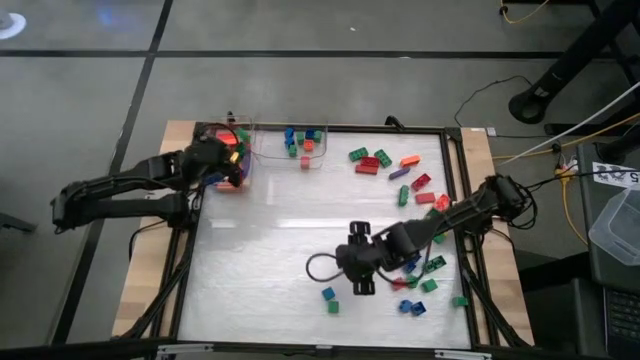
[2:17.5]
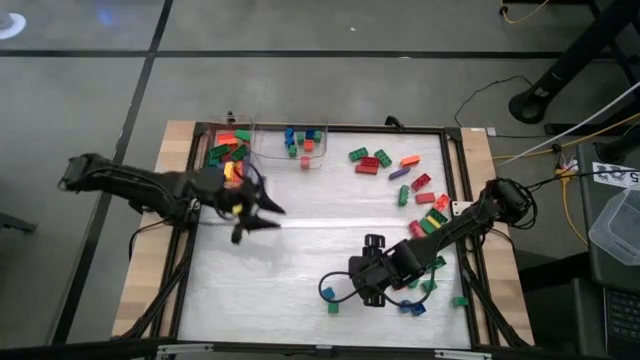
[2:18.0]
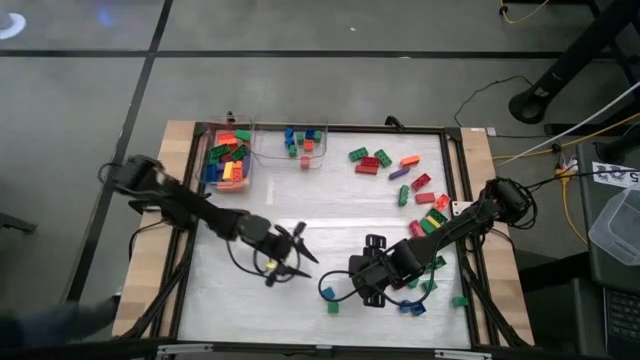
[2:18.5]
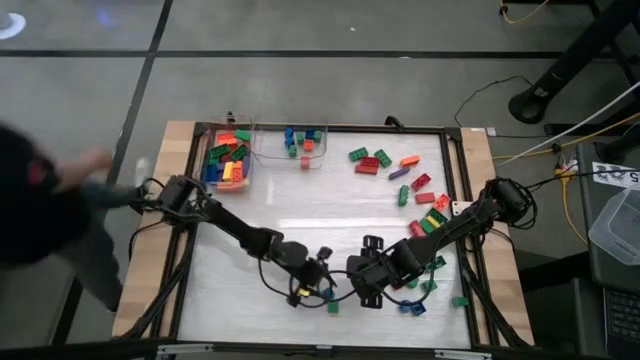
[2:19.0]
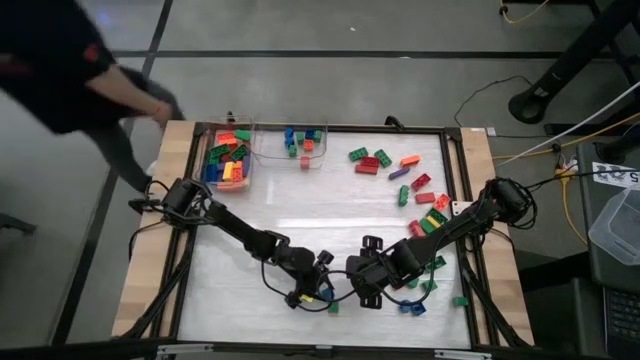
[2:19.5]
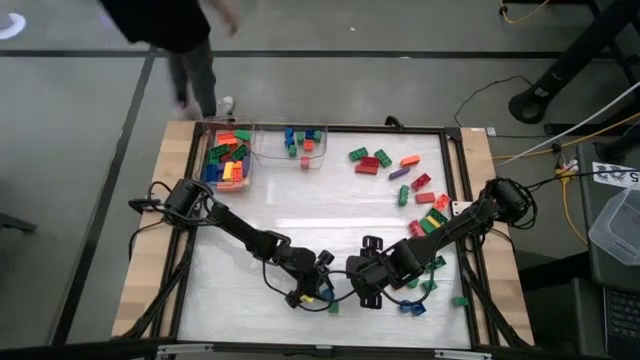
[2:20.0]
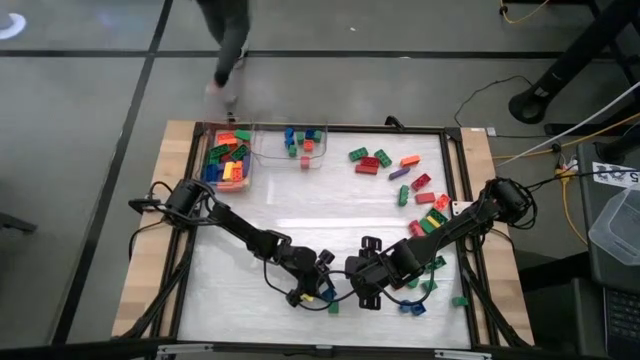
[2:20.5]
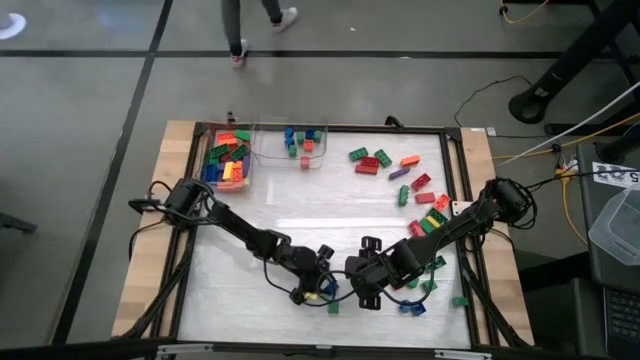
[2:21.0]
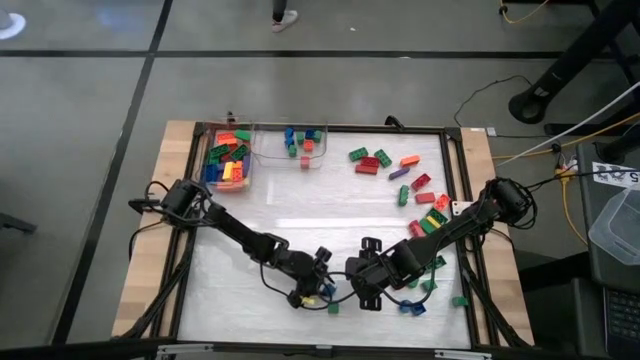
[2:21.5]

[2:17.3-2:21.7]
Task: Sort blocks by size
Put the small blue block into the right transparent bin

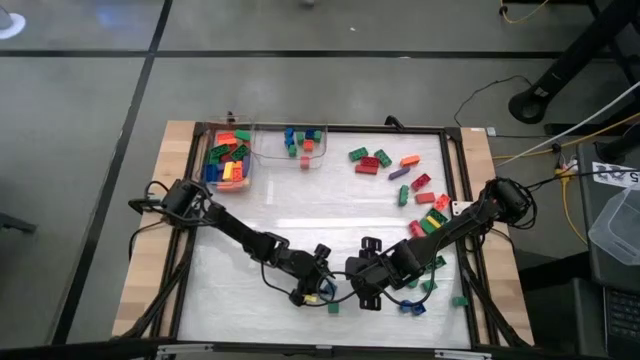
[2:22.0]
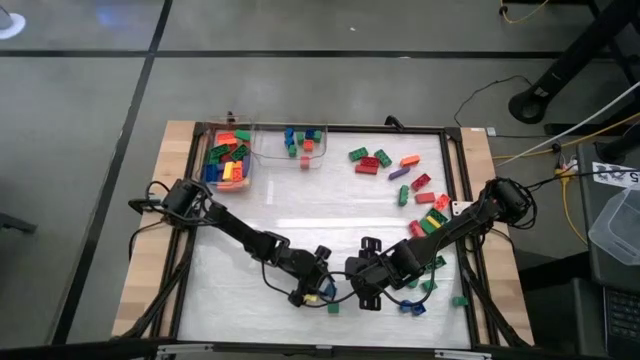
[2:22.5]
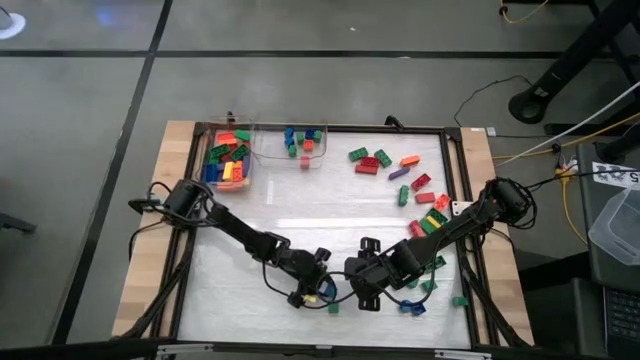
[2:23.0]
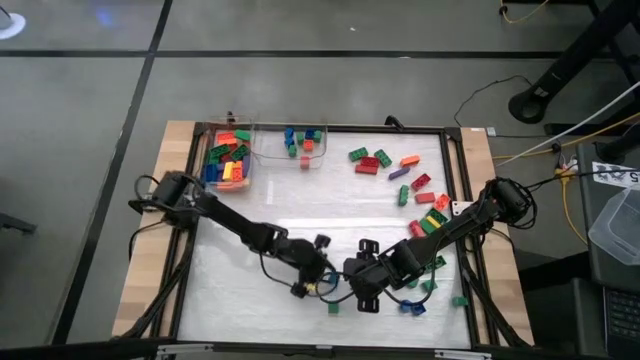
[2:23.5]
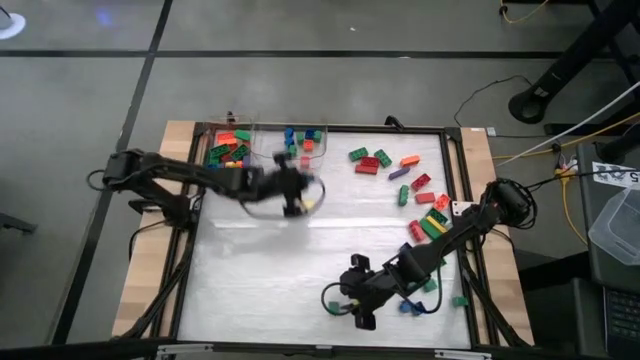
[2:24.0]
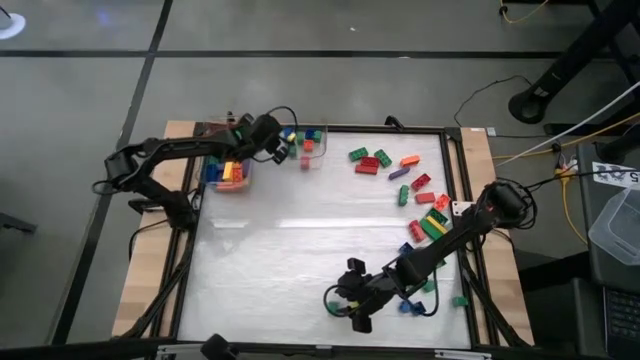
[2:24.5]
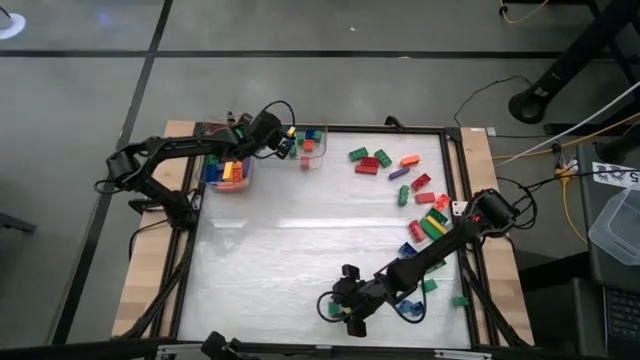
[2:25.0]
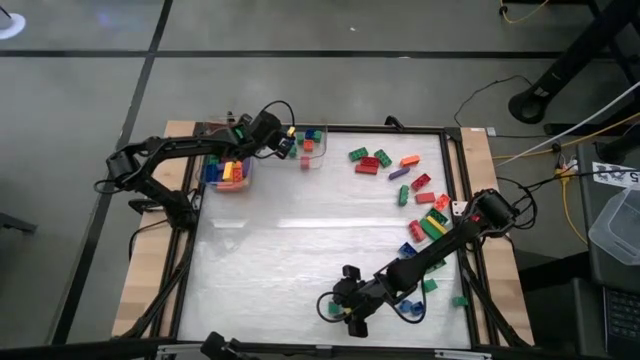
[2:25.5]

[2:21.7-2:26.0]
Put the small blue block into the right transparent bin

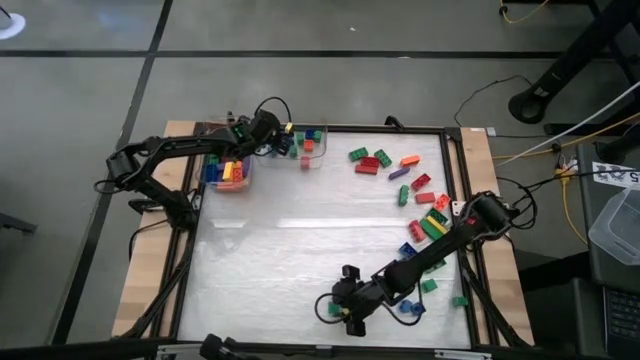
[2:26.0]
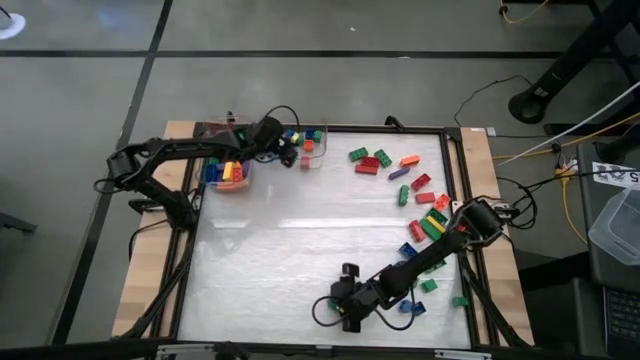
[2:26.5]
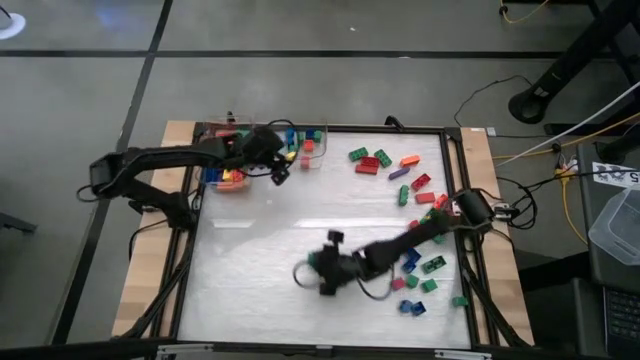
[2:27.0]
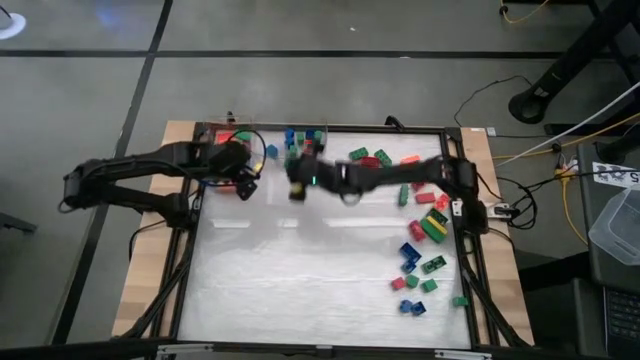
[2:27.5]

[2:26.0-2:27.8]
Put the small green block into the right transparent bin

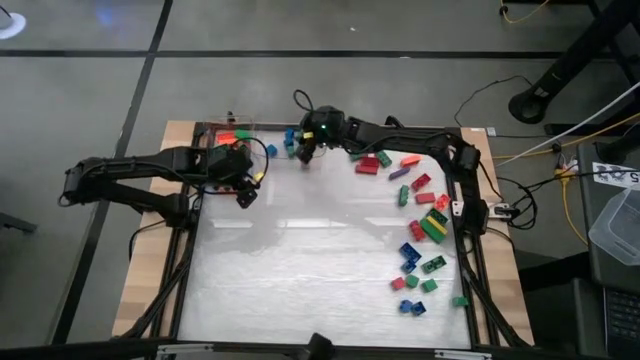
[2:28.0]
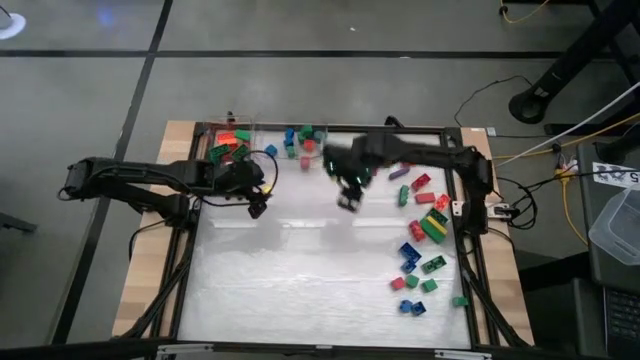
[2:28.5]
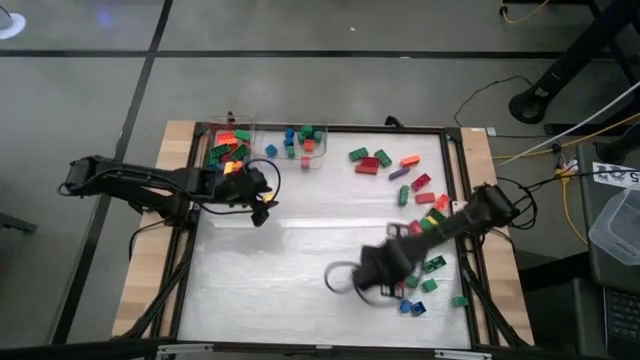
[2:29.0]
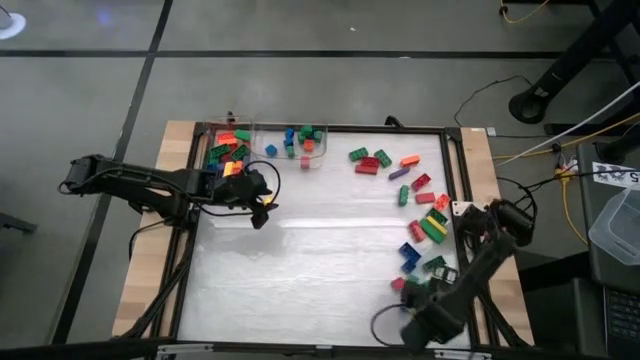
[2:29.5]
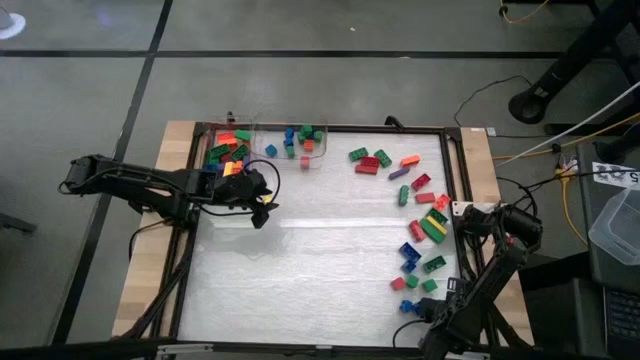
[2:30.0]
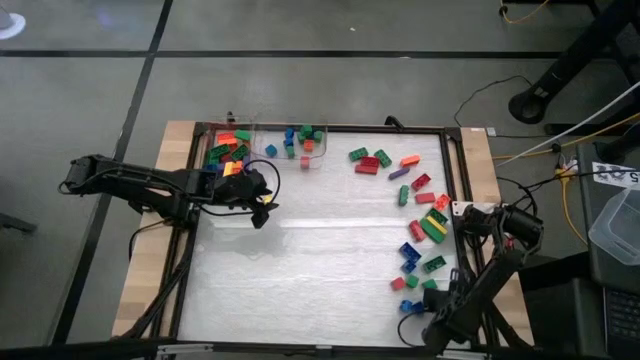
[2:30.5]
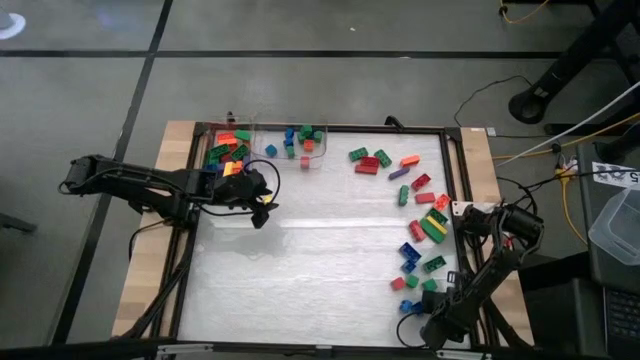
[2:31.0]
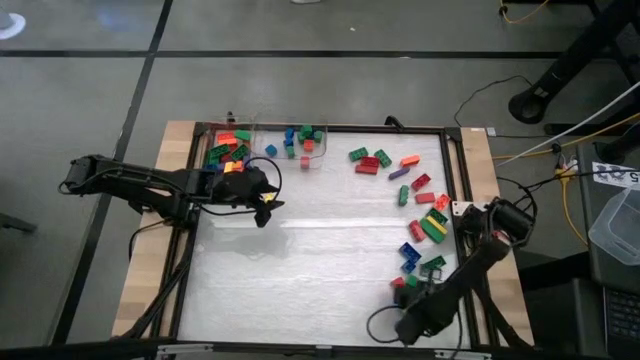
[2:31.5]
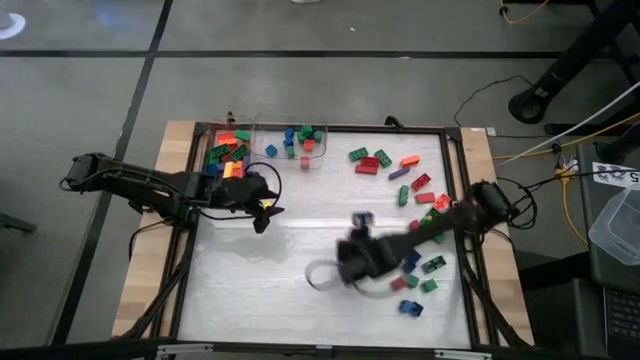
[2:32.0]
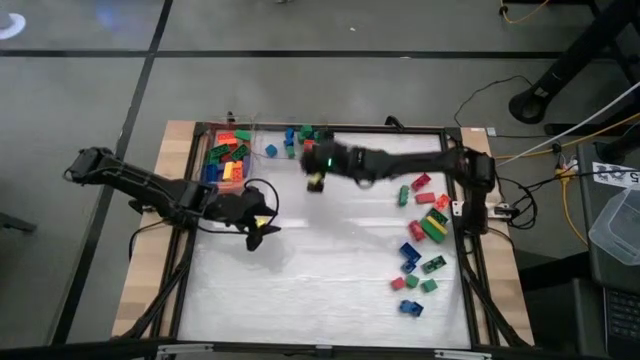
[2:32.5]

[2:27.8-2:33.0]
Put the small green game piece into the right transparent bin

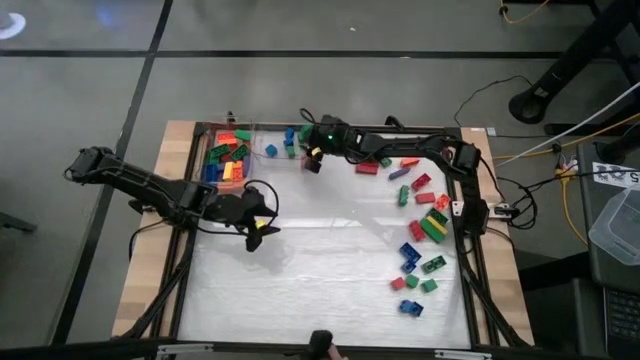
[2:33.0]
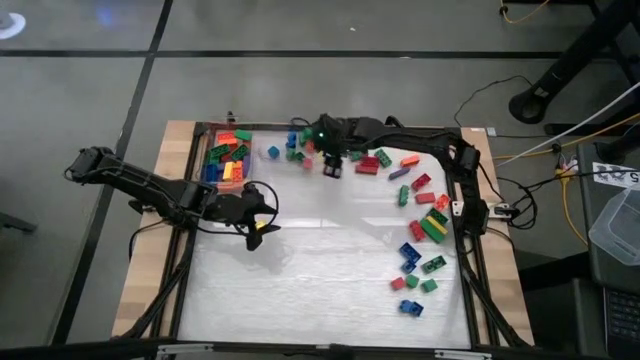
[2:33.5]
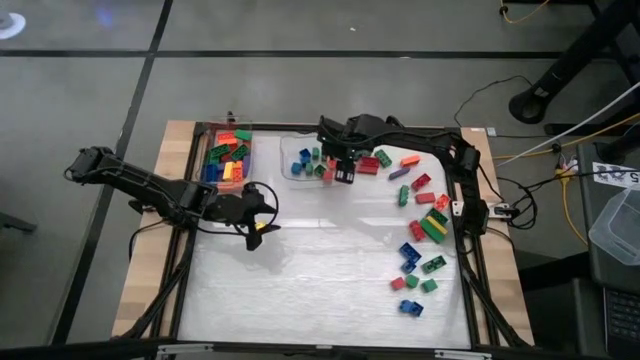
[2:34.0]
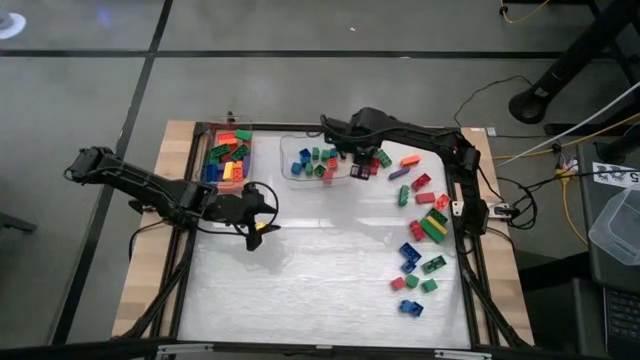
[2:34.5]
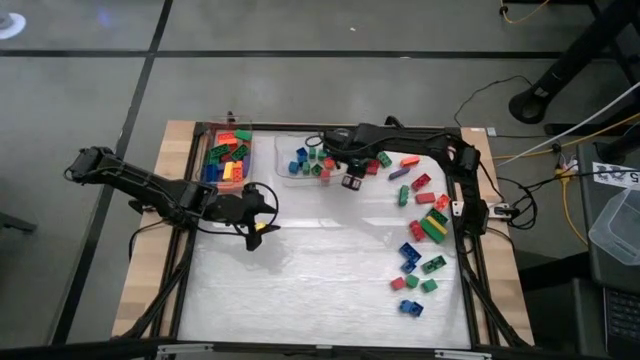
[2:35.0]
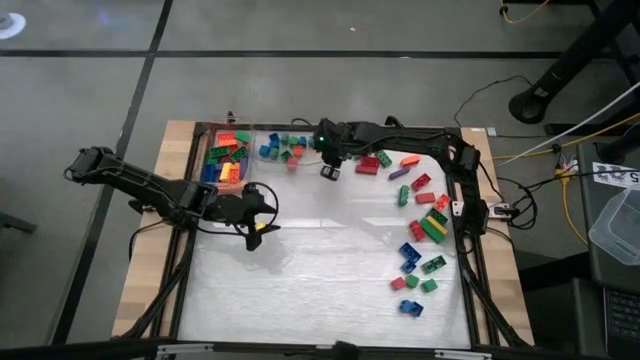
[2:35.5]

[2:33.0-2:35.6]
Adjust the right transparent bin

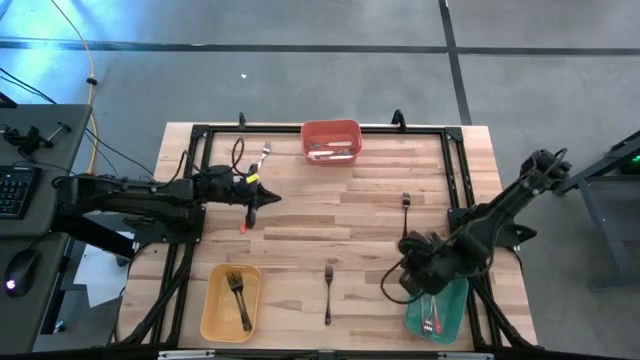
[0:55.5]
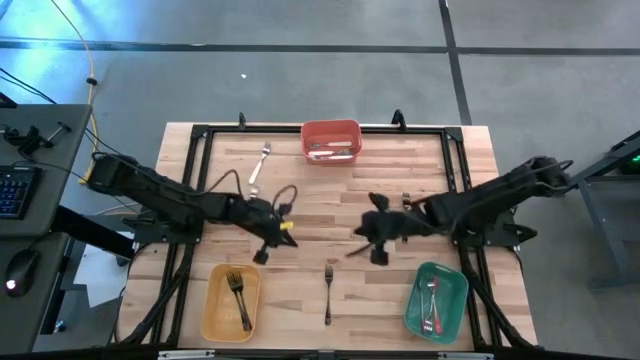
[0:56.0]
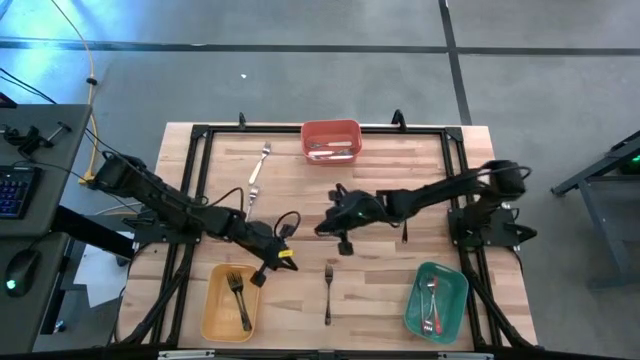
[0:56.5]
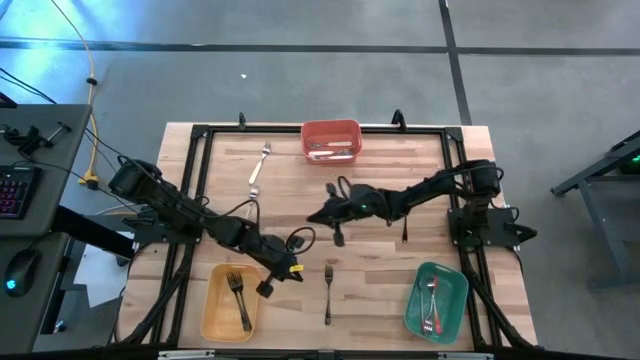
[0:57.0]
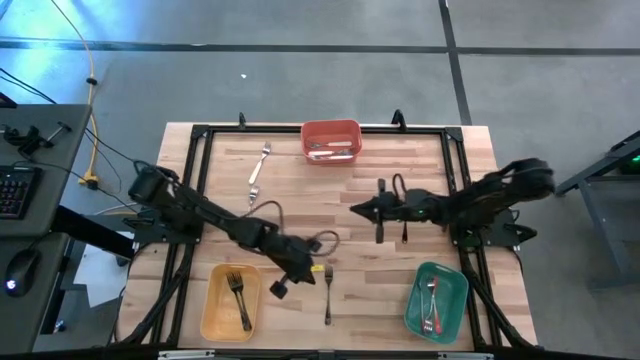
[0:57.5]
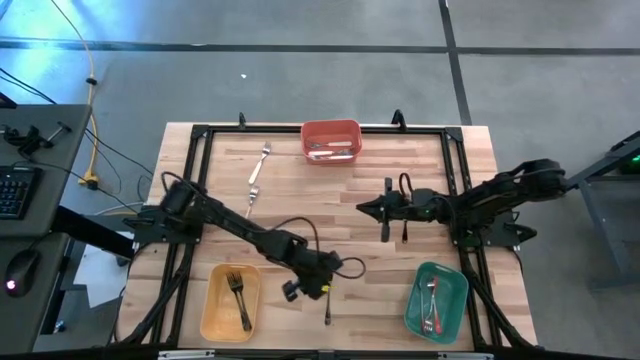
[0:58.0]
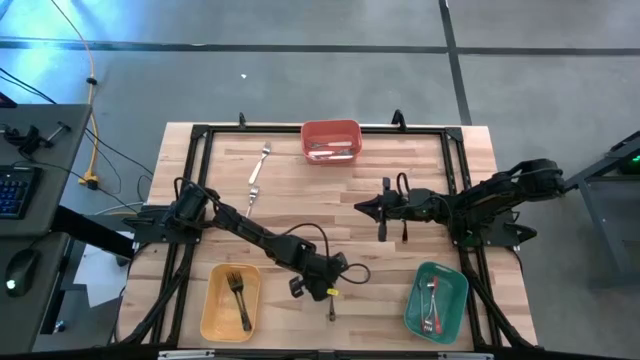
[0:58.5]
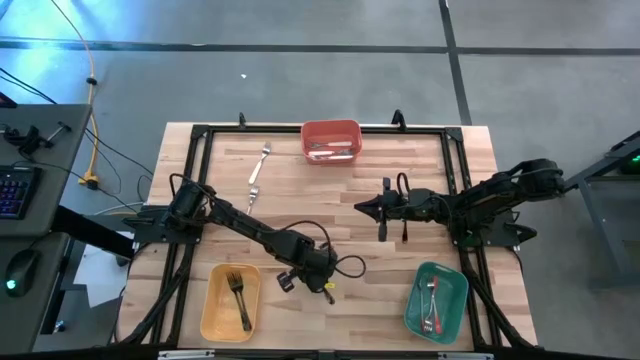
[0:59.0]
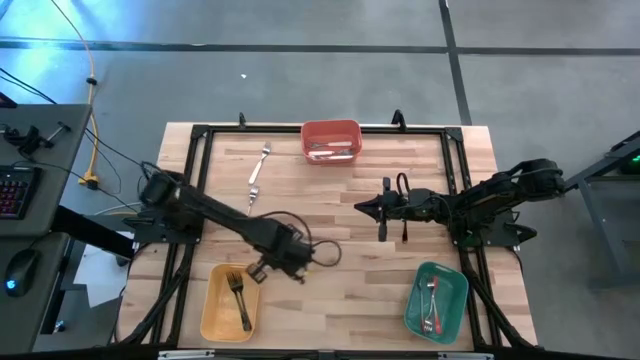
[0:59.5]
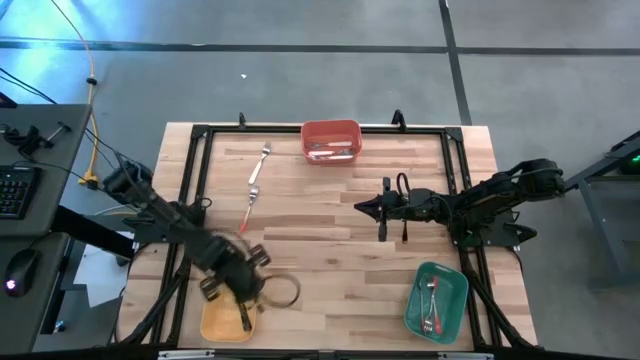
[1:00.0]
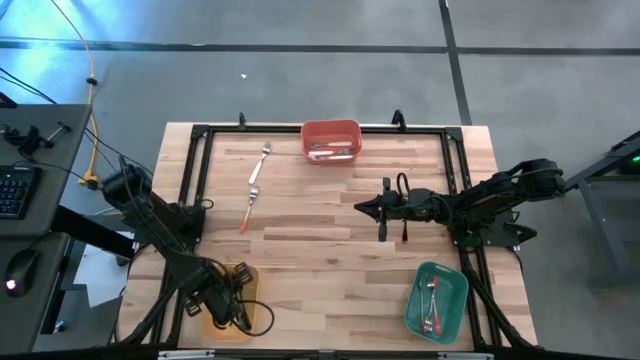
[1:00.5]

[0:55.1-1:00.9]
Task: Sort silverware by color (type)
Put the bottom black fork into the yellow bin
